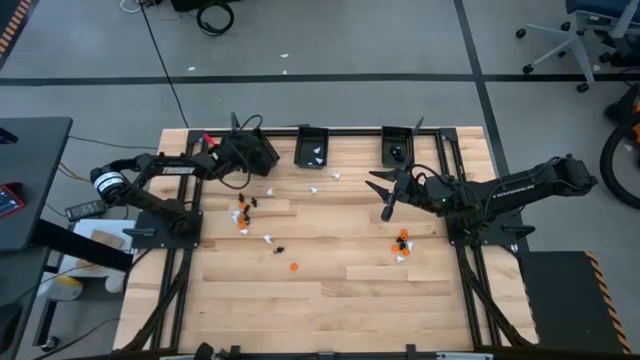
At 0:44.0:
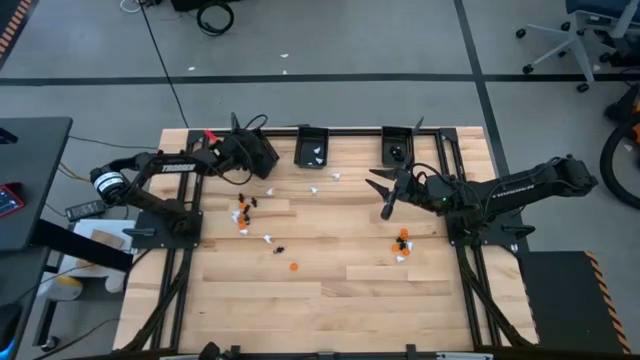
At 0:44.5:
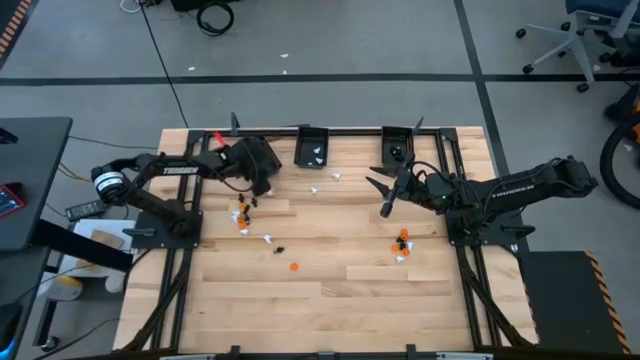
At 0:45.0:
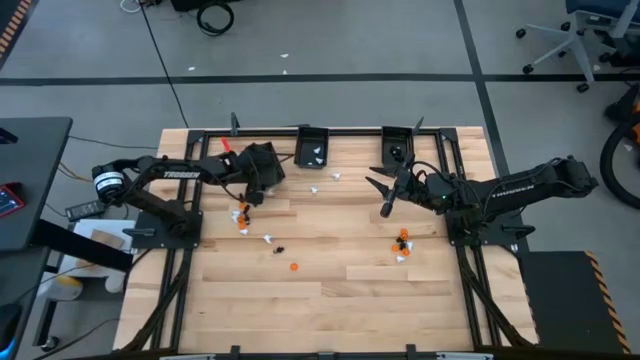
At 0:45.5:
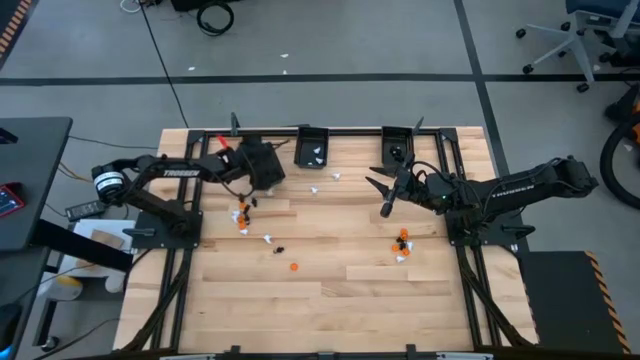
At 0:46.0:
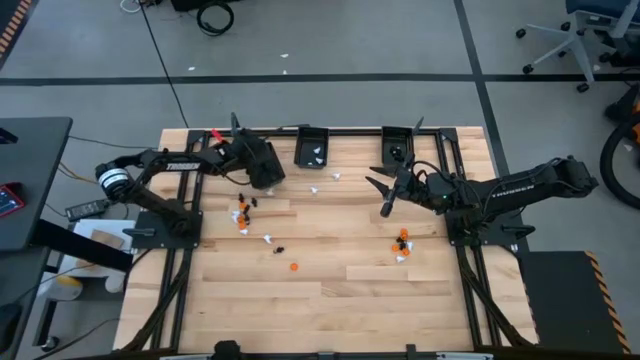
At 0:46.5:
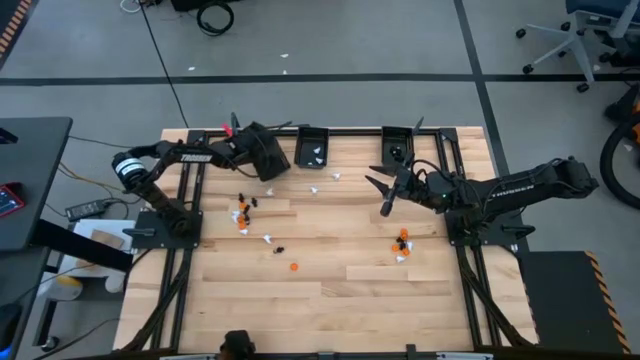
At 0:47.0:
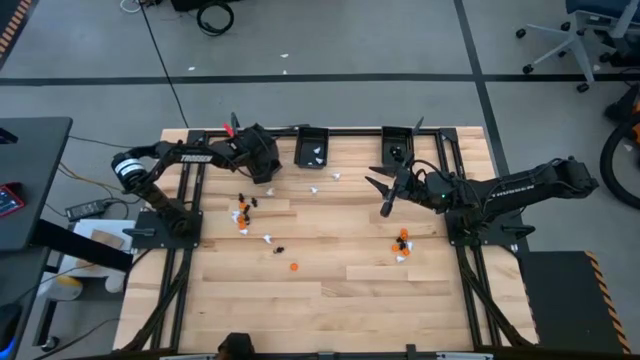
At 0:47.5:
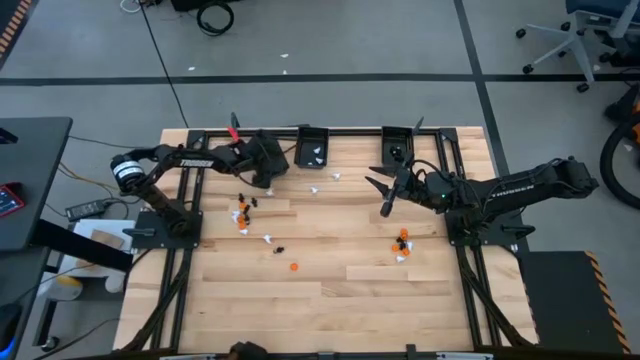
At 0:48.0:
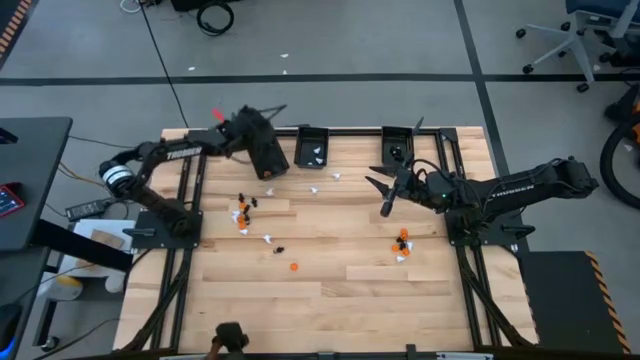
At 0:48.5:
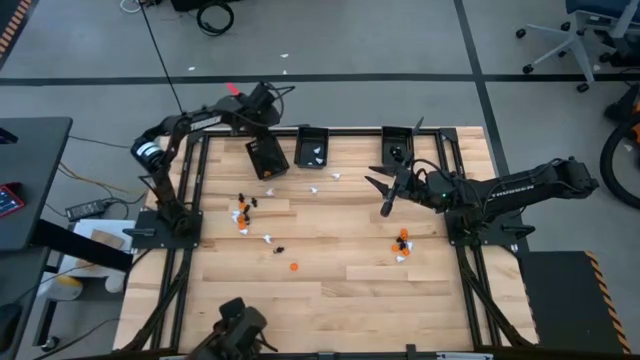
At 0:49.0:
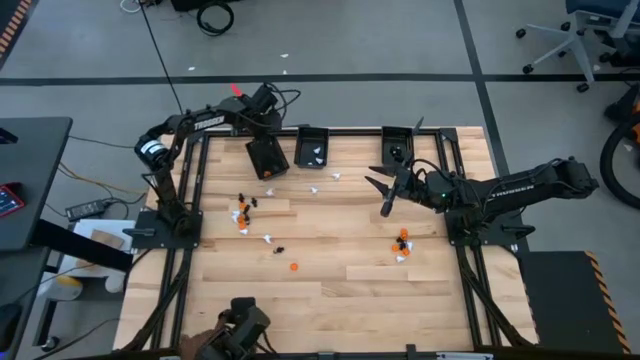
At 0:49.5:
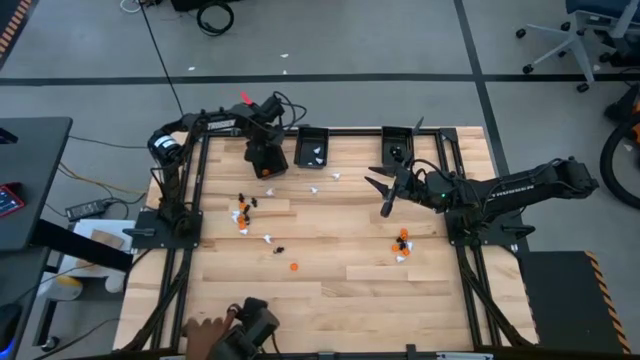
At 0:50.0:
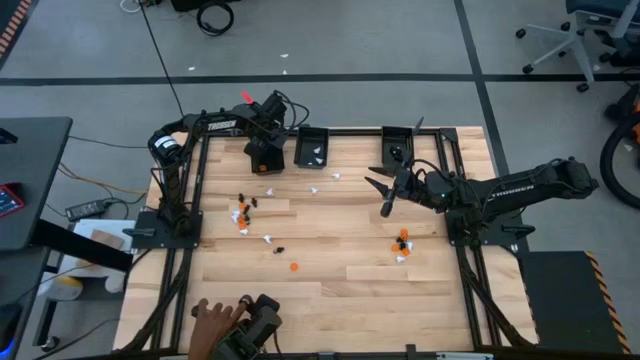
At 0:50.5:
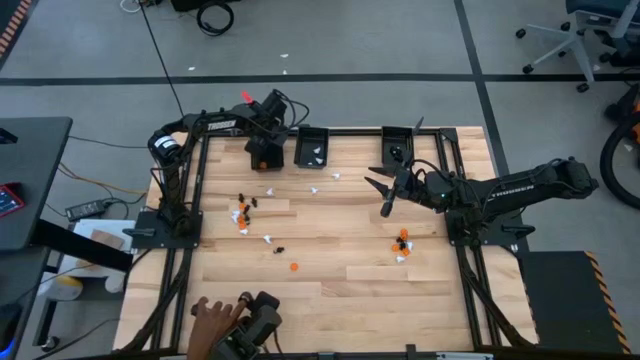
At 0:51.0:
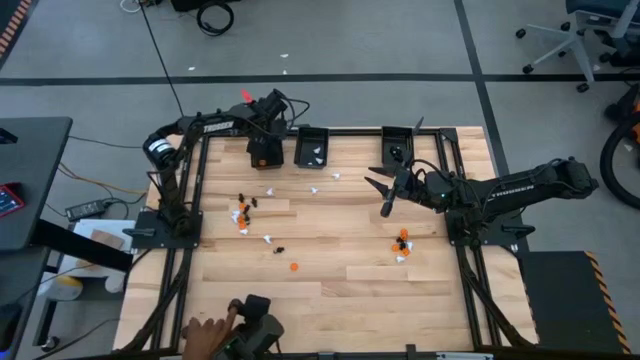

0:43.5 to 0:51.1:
Task: Sort Halloween decoration
Adjust the left black bin

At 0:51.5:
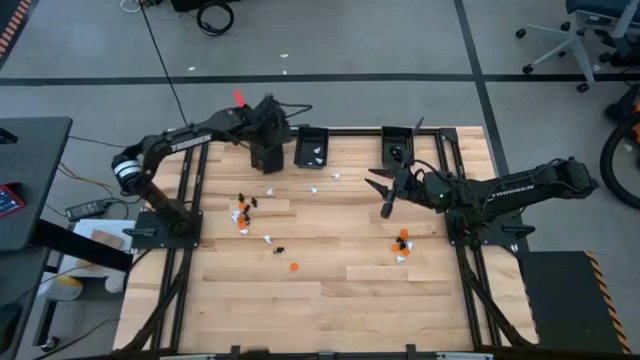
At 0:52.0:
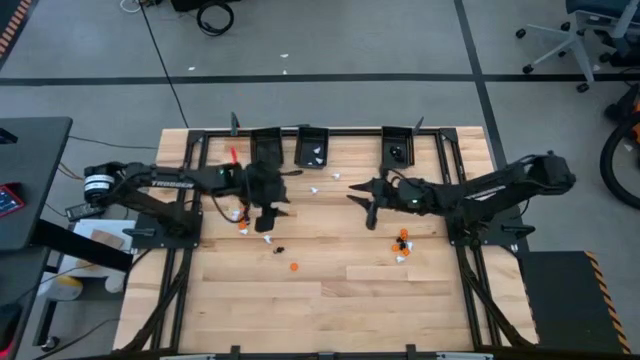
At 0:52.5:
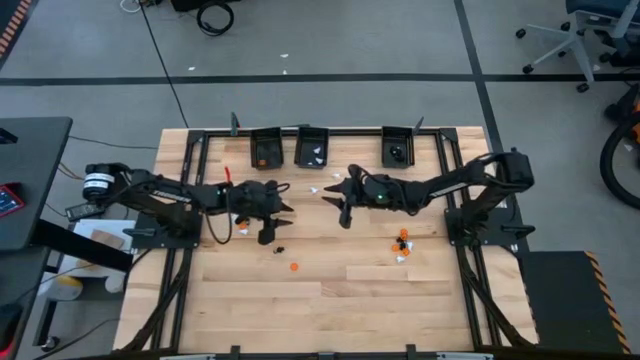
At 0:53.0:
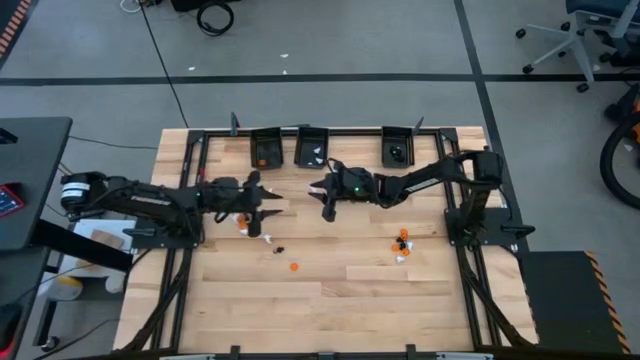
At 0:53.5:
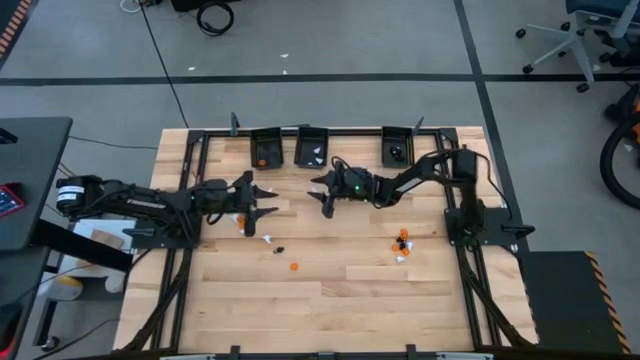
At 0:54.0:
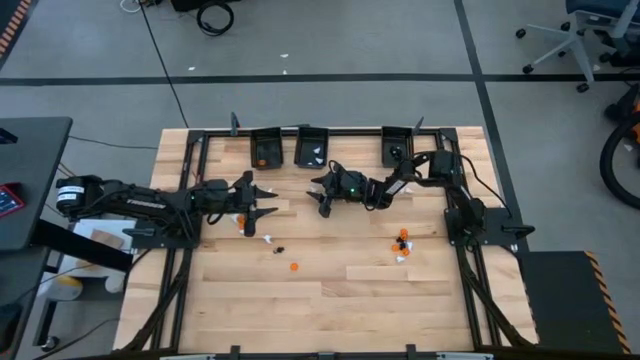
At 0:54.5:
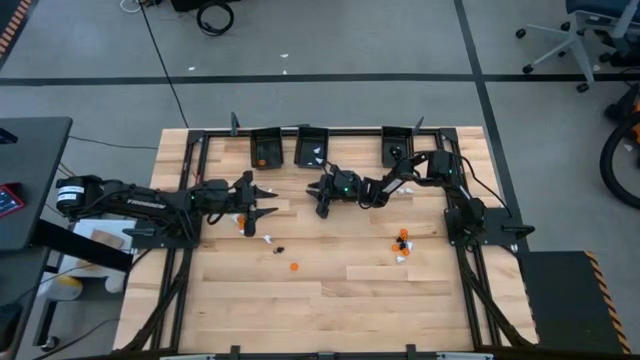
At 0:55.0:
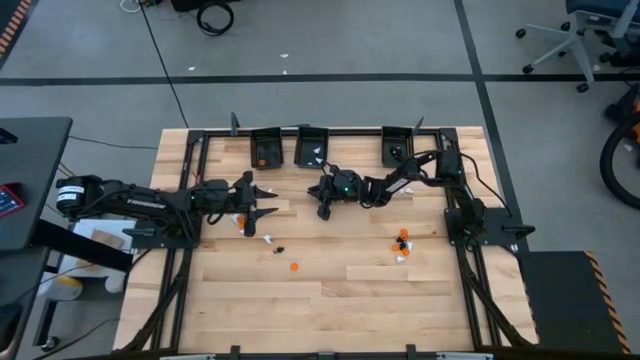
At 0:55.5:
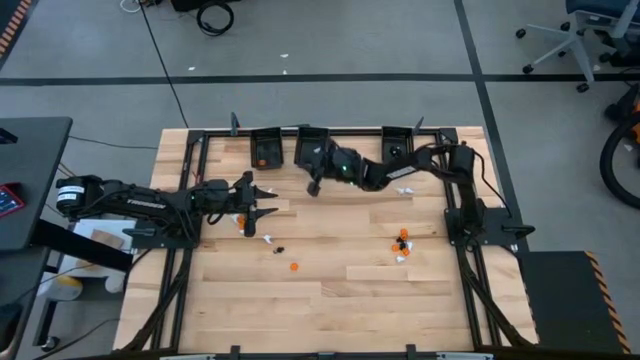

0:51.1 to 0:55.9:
Put the white ghost toy into the middle black bin

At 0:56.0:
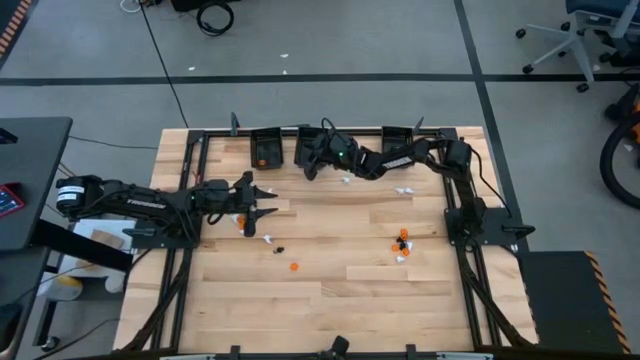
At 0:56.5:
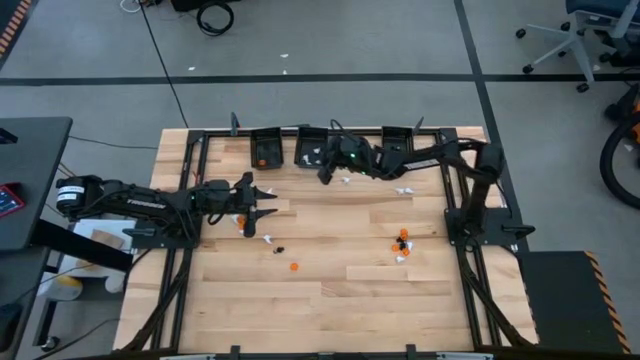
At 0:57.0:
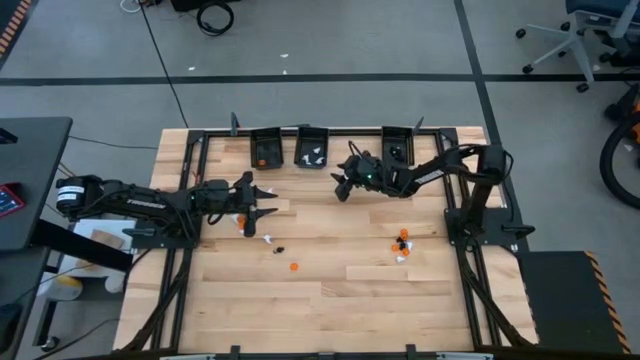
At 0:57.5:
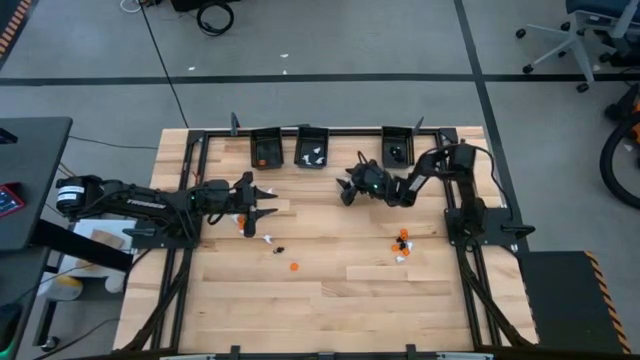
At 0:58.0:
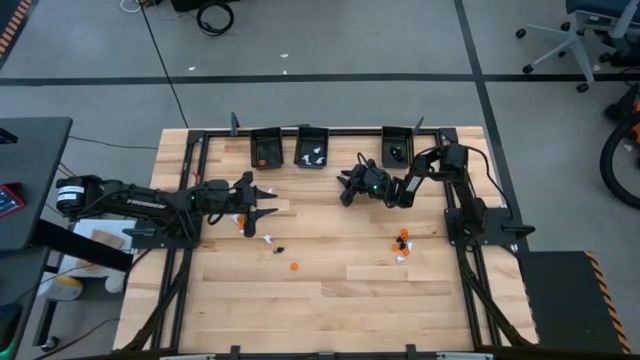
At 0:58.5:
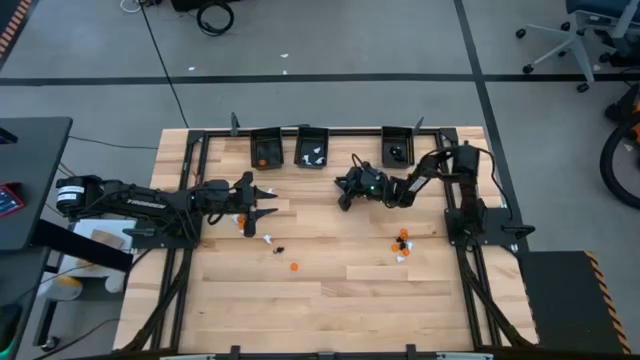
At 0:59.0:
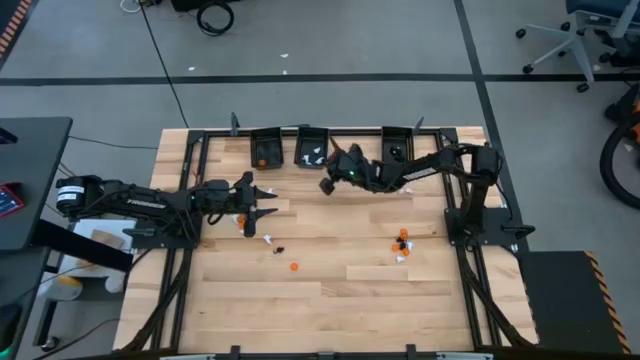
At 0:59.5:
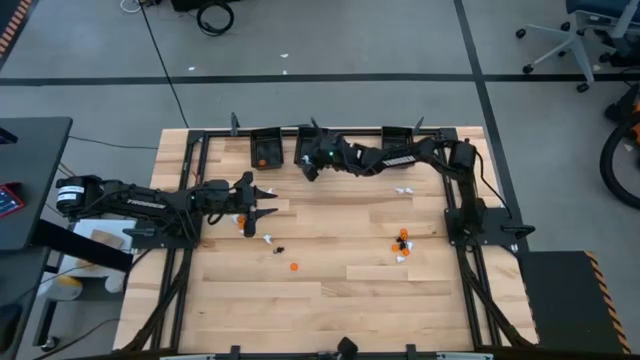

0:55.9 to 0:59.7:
Put the white ghost toy into the middle black bin

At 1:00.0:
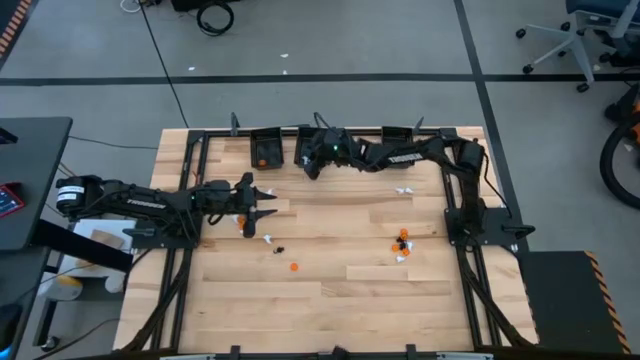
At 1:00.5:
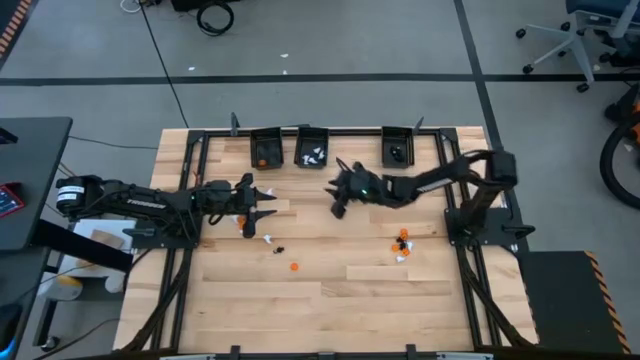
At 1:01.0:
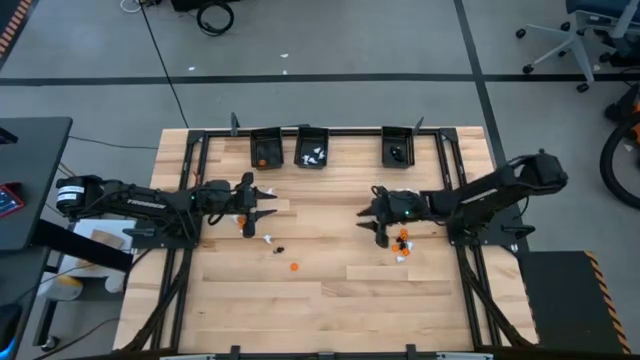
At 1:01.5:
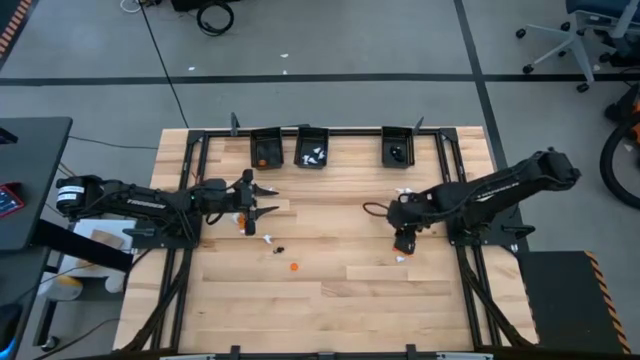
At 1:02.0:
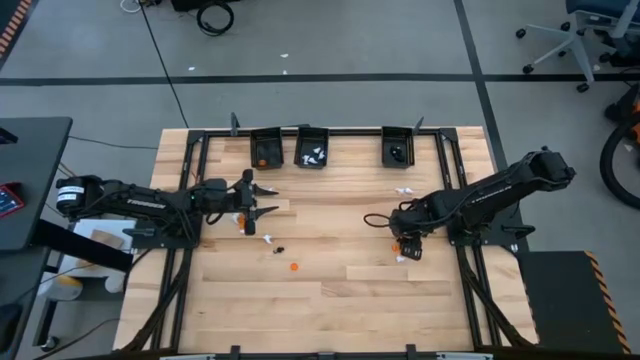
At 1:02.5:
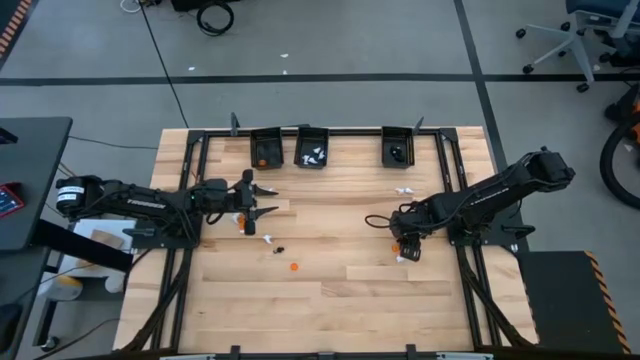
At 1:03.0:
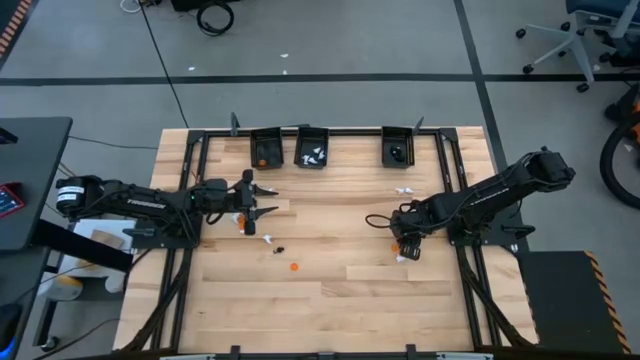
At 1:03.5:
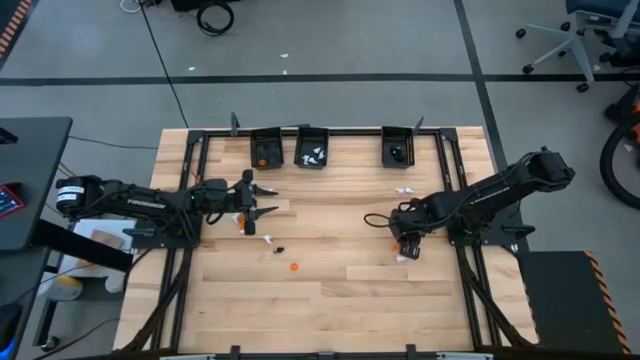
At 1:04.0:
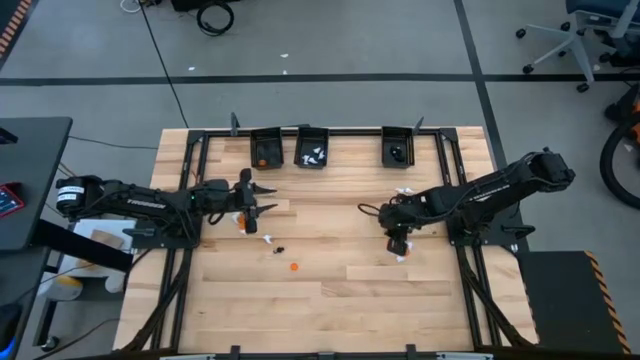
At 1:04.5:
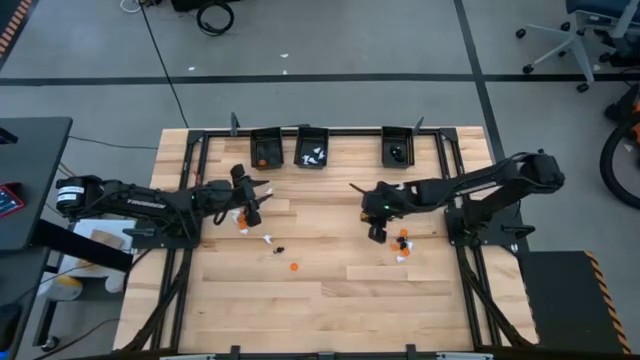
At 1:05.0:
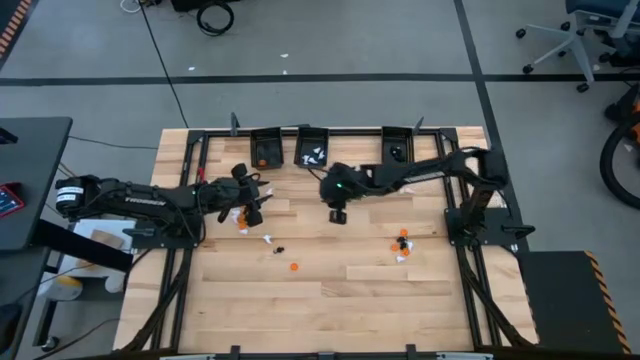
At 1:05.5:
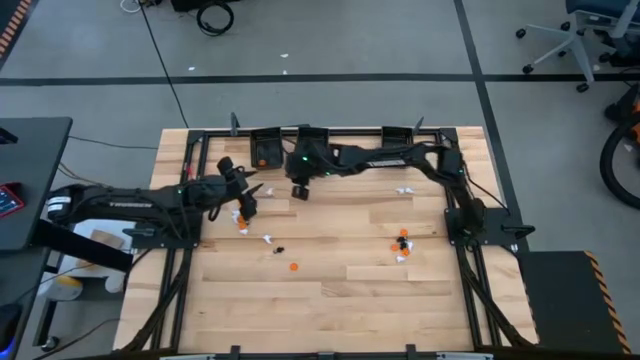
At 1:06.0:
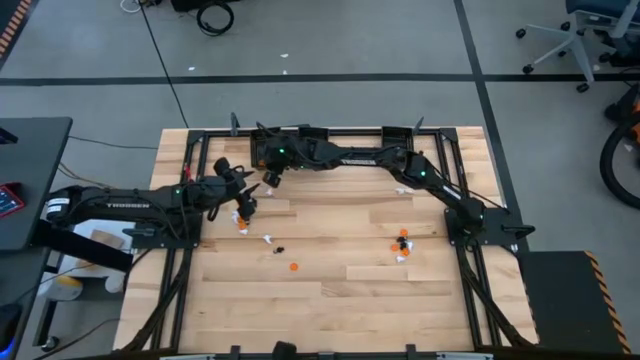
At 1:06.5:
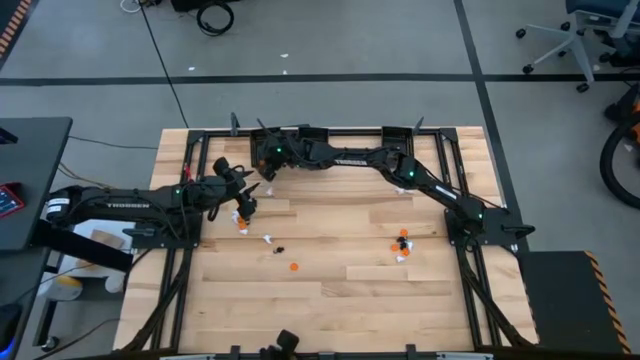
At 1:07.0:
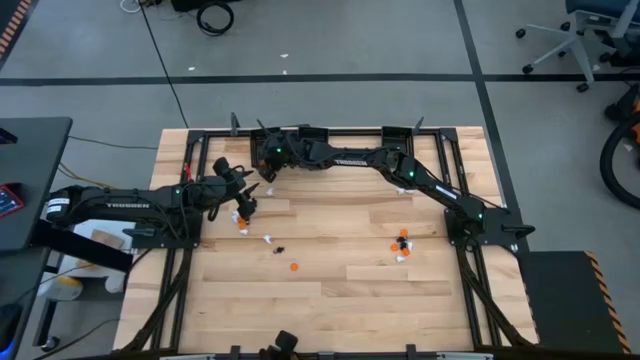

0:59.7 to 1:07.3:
Put the orange pumpkin toy into the left black bin
